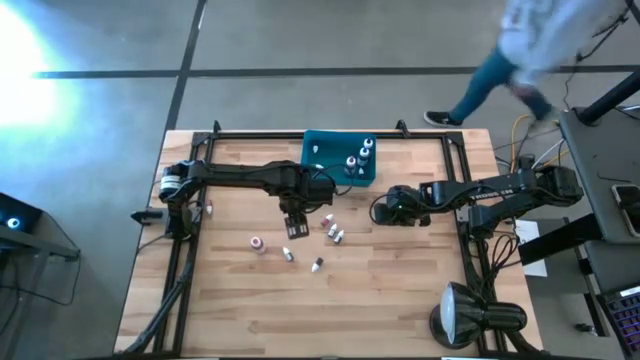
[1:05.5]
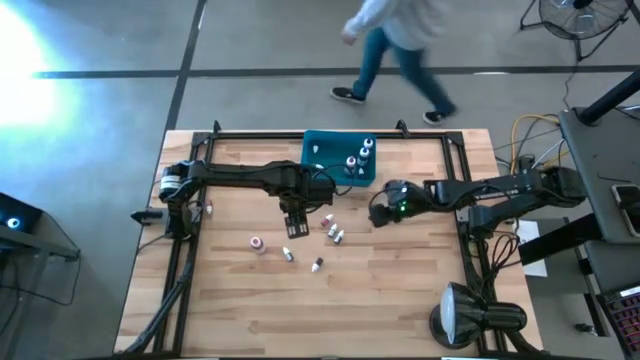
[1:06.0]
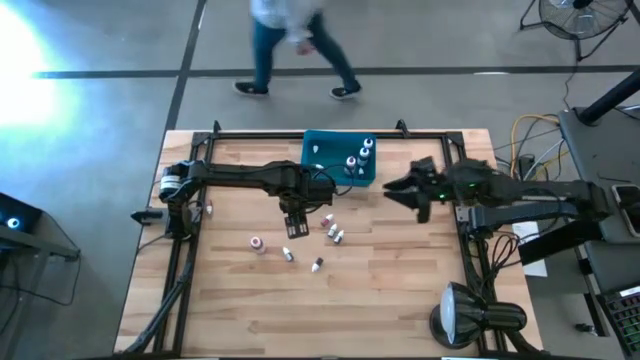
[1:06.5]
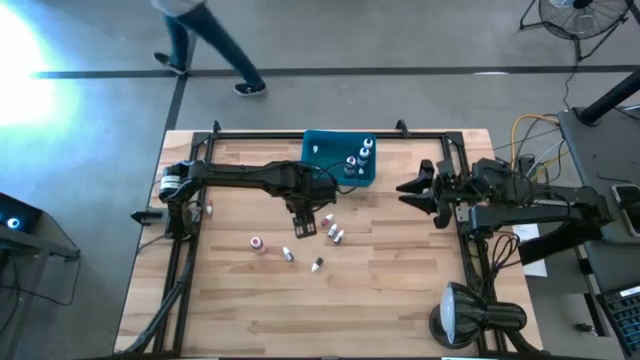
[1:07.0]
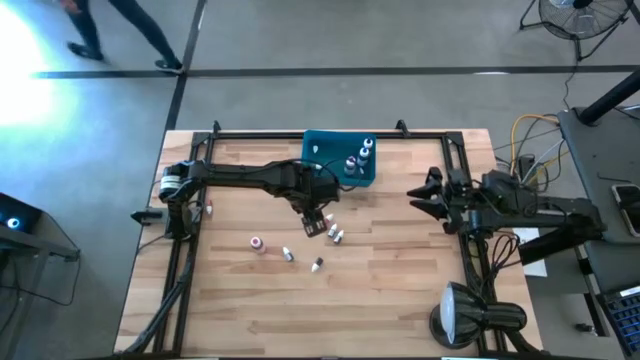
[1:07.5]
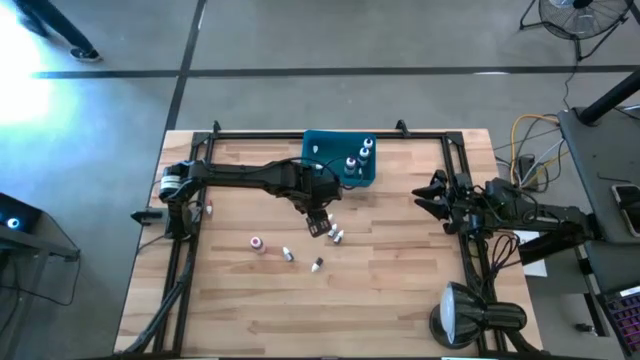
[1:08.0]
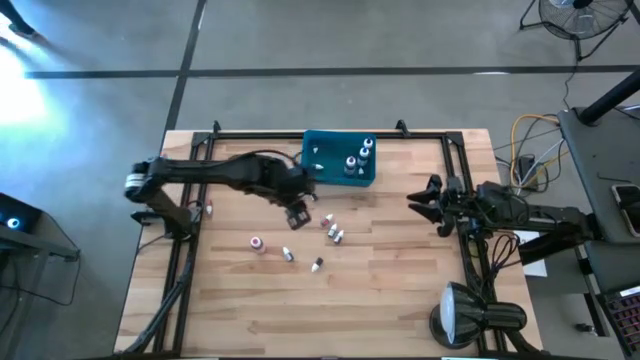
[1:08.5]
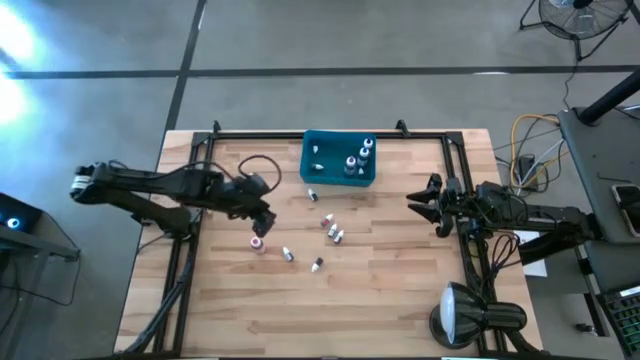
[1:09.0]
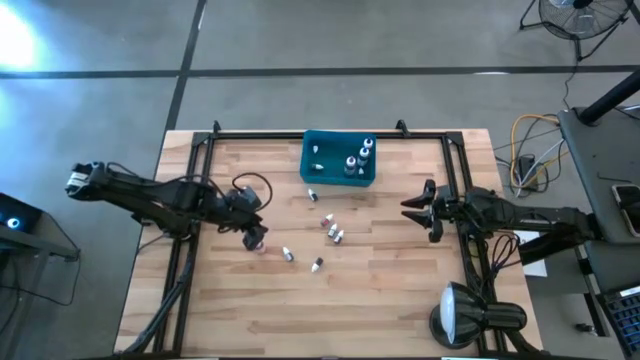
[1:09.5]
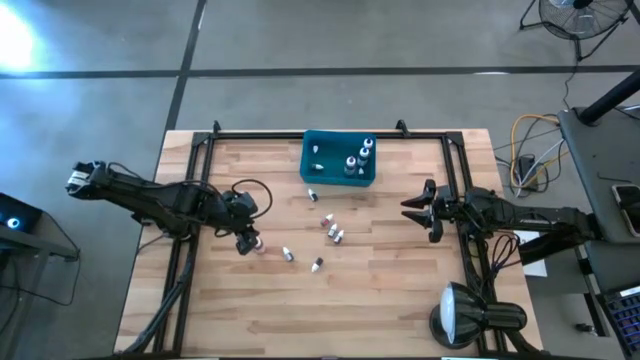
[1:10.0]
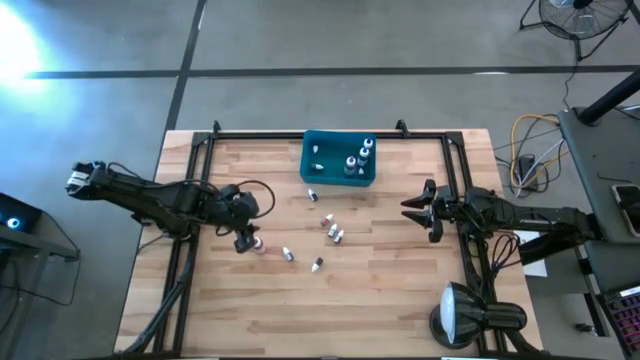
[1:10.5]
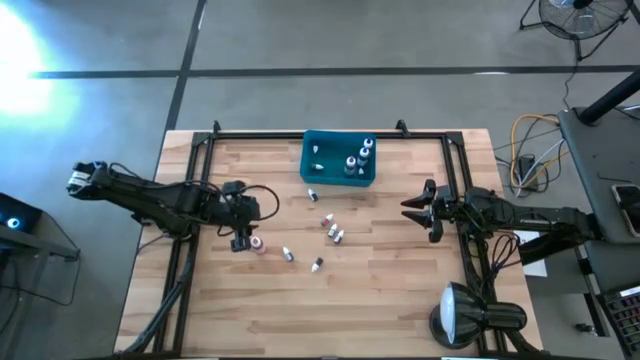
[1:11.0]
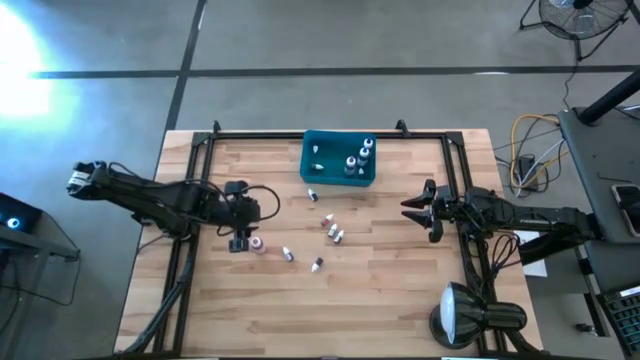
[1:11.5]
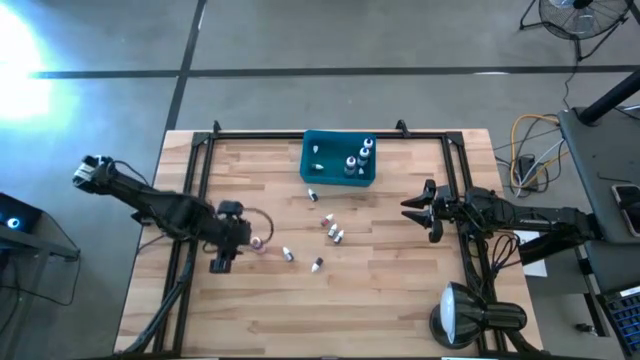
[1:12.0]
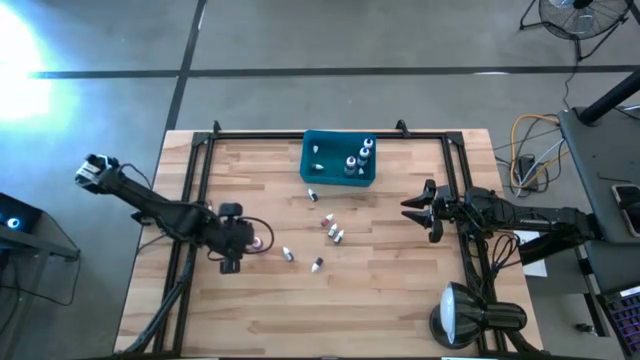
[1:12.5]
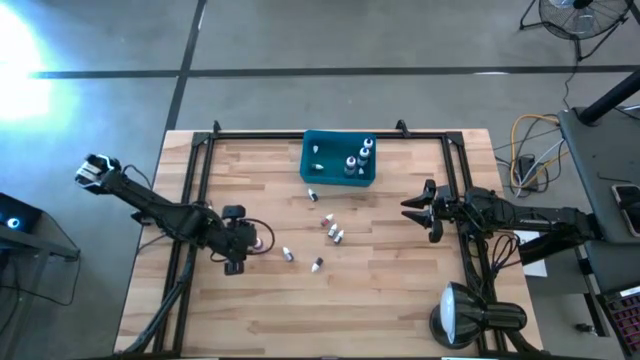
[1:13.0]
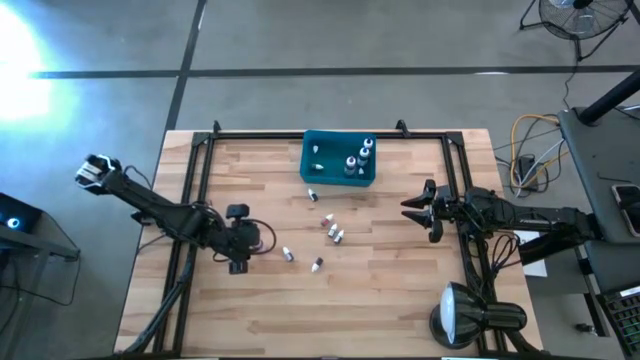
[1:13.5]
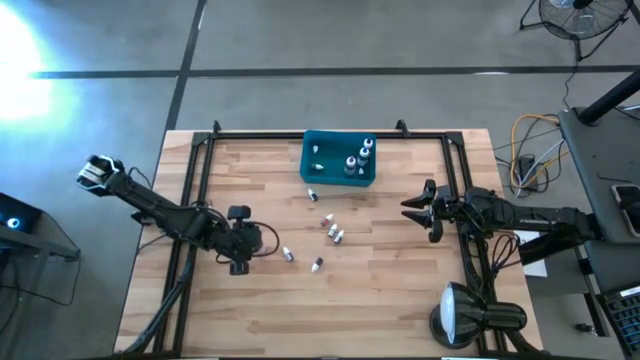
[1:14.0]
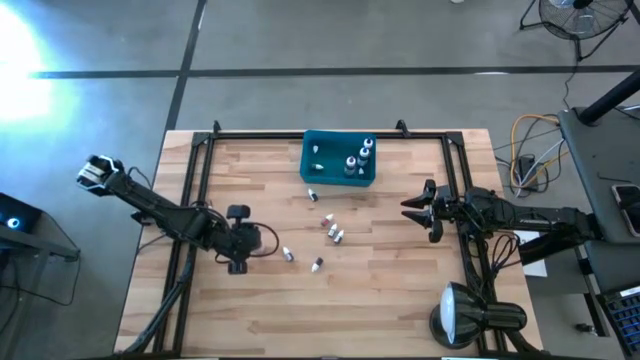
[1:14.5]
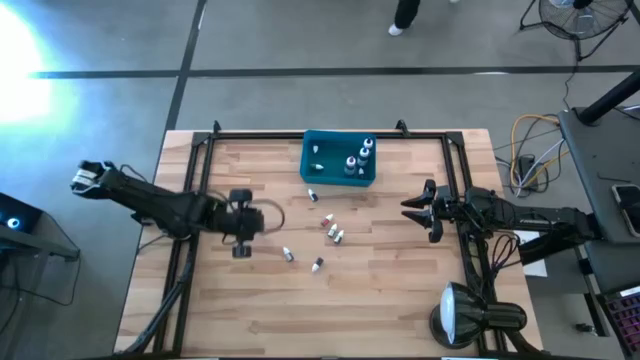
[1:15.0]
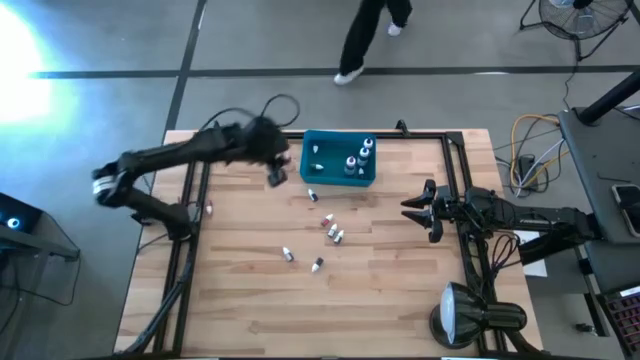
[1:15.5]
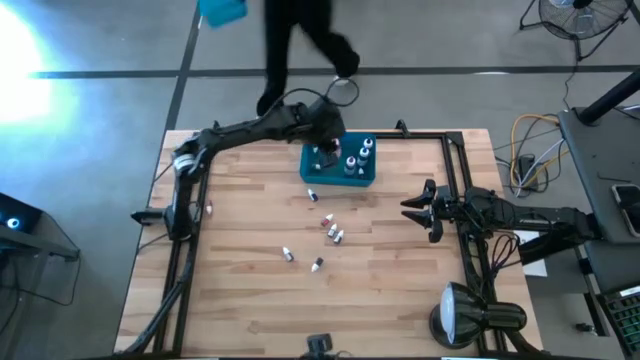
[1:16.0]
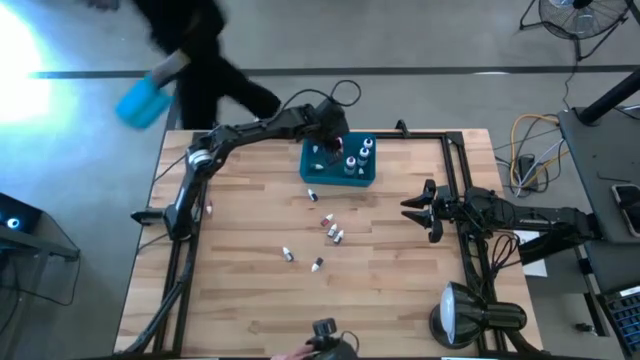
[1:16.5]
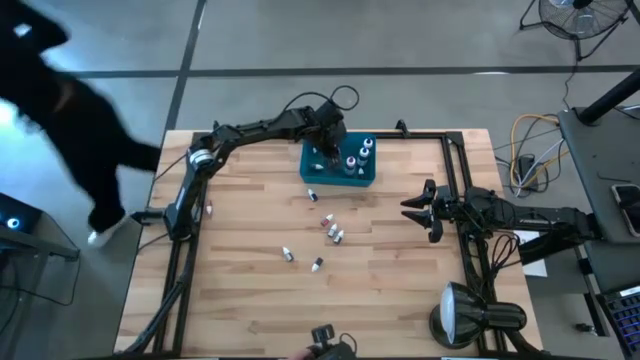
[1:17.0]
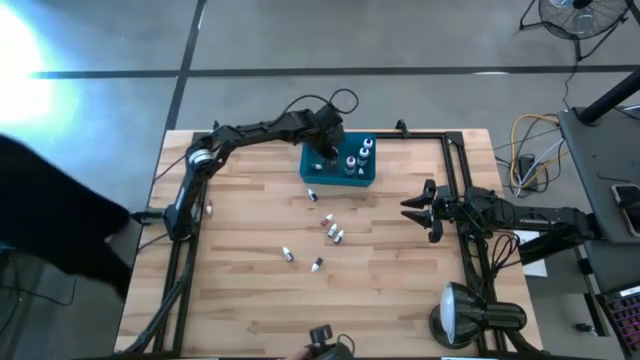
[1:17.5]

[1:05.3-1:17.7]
Task: Pick & Place food coloring
Put the large pink food coloring bottle into the blue bin

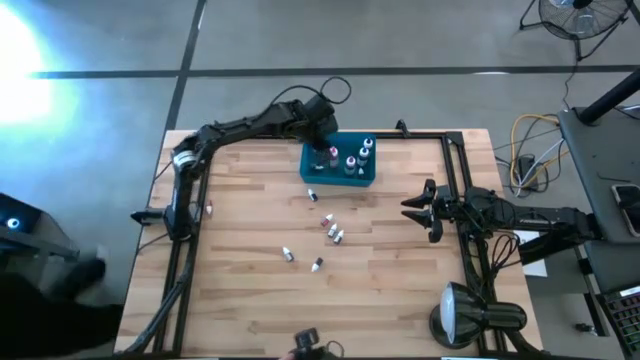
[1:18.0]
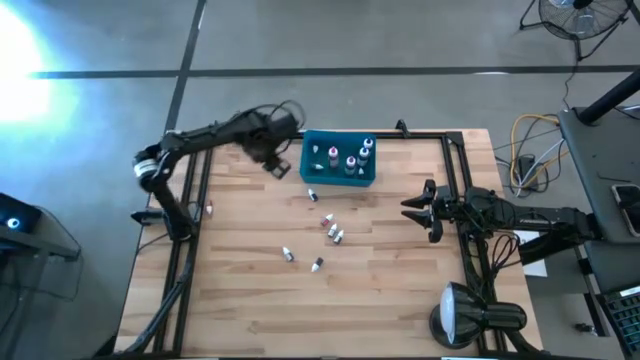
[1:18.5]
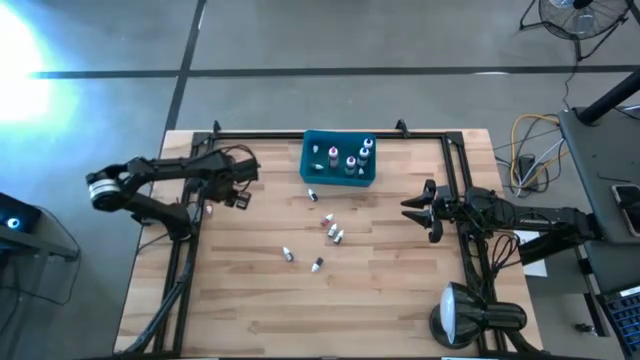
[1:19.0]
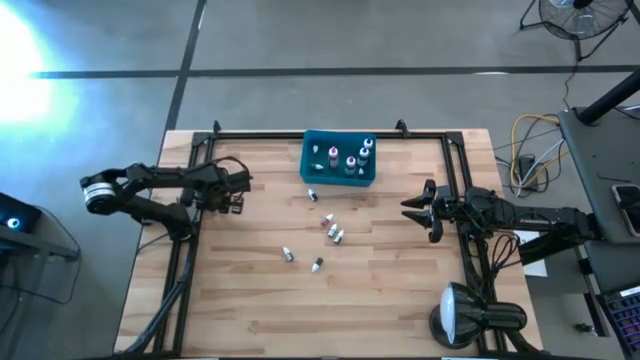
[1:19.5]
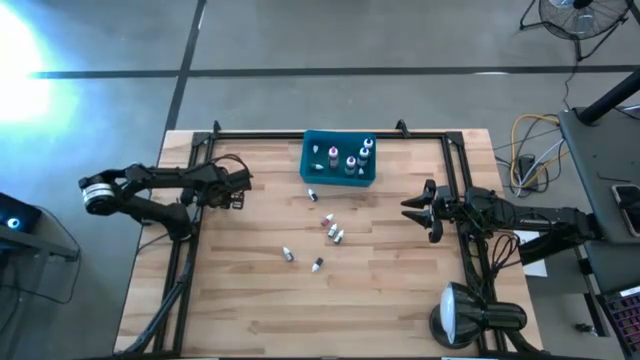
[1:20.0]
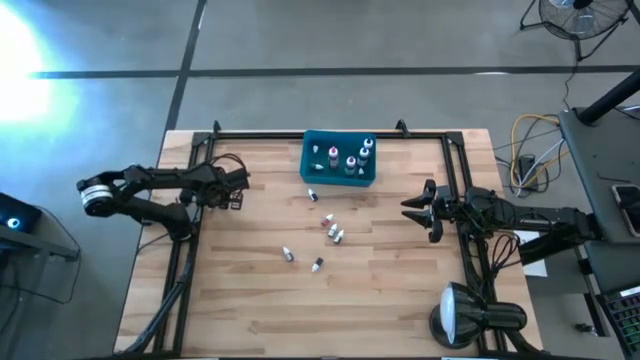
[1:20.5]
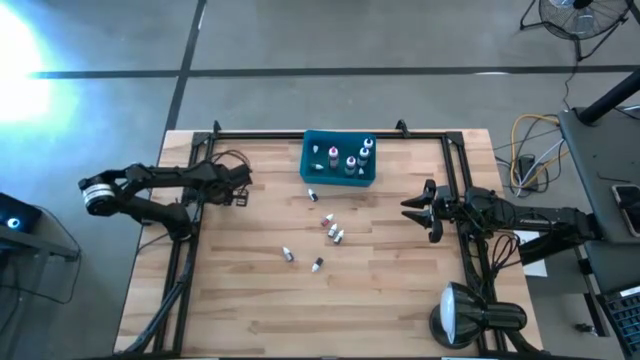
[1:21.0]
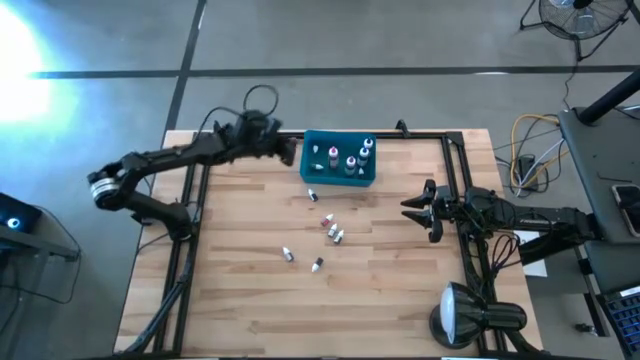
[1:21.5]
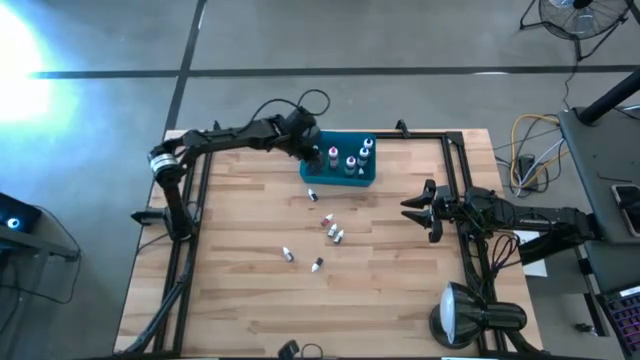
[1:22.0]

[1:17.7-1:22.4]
Put the small yellow food coloring bottle into the blue bin

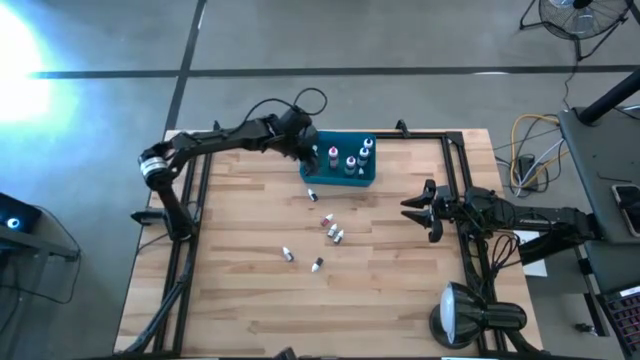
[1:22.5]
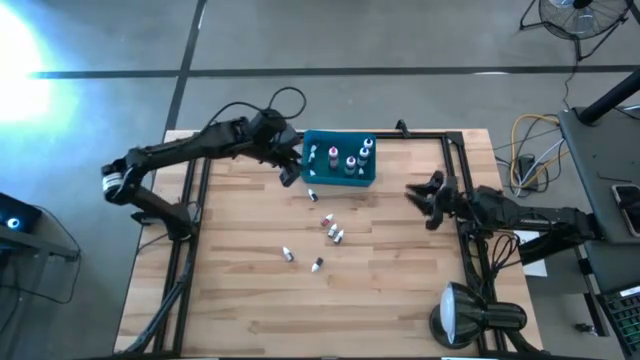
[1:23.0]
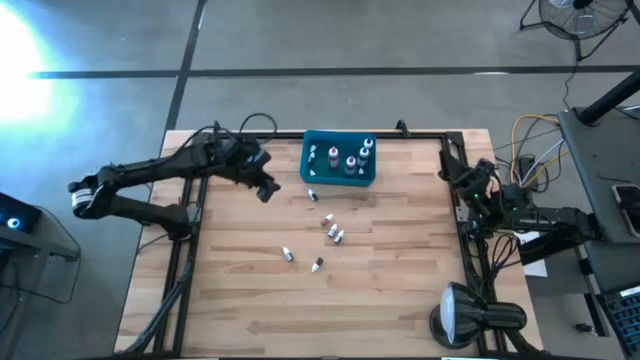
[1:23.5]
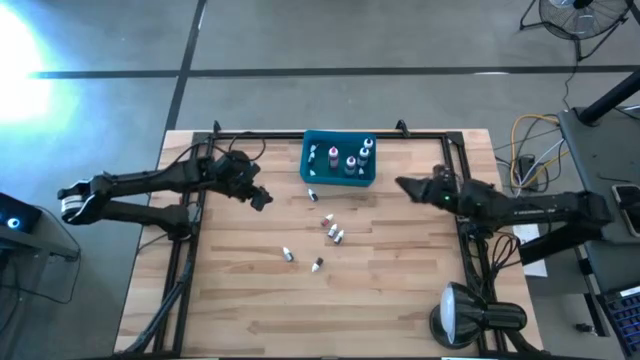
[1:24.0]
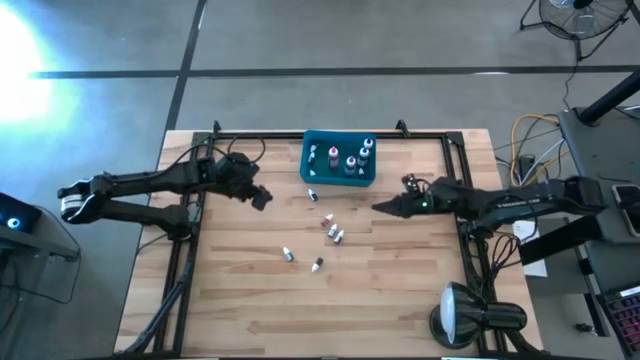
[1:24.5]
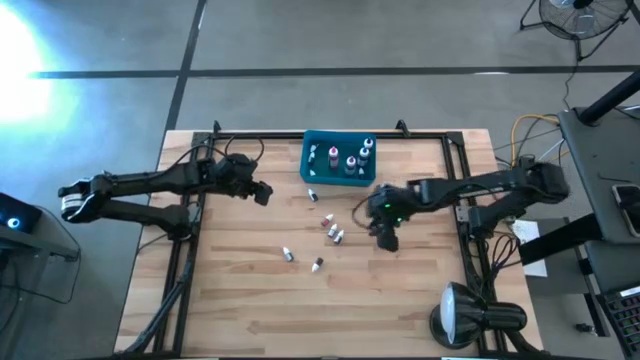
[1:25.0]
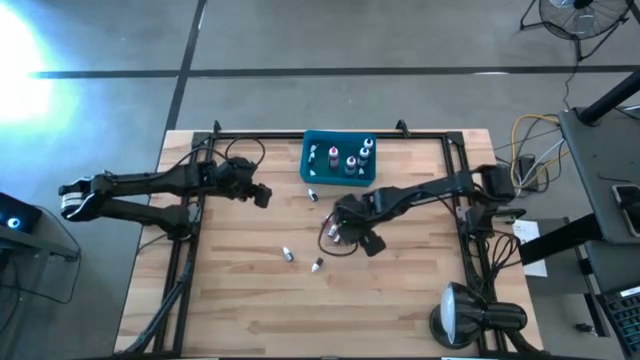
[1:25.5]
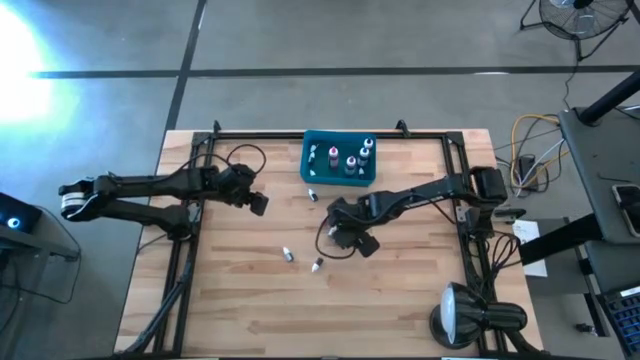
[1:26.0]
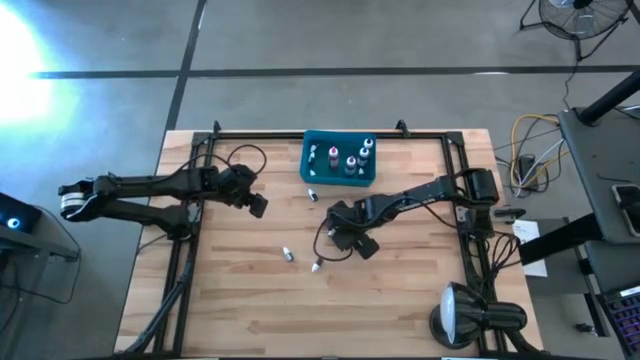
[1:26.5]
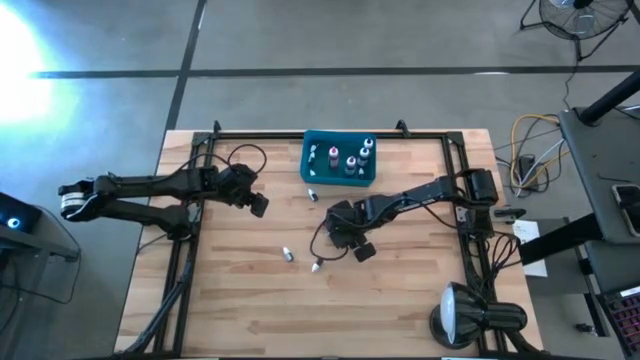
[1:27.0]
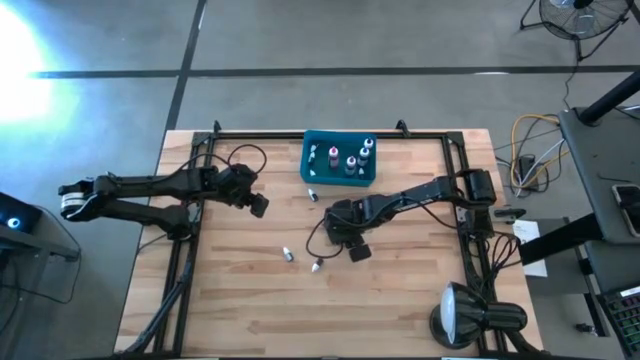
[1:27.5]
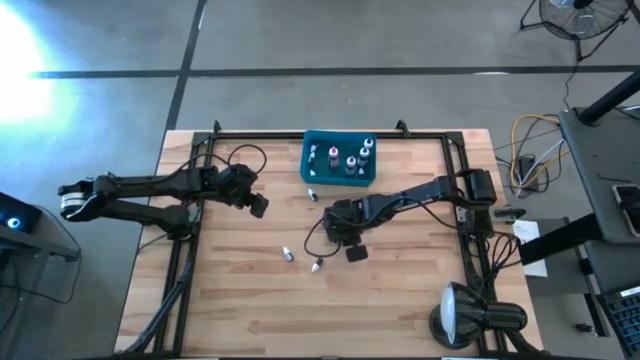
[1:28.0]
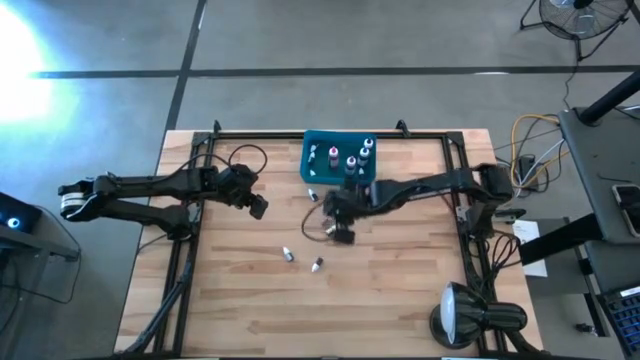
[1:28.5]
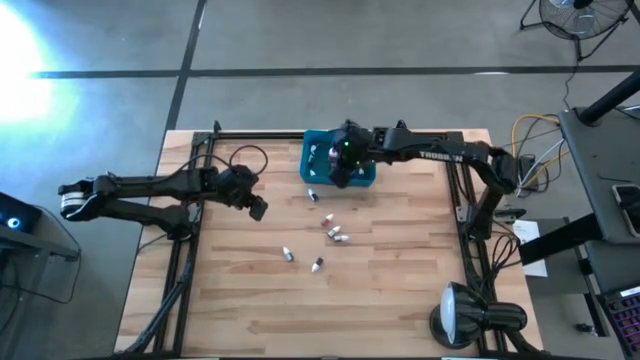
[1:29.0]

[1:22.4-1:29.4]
Put the bottom small red food coloring bottle into the blue bin
